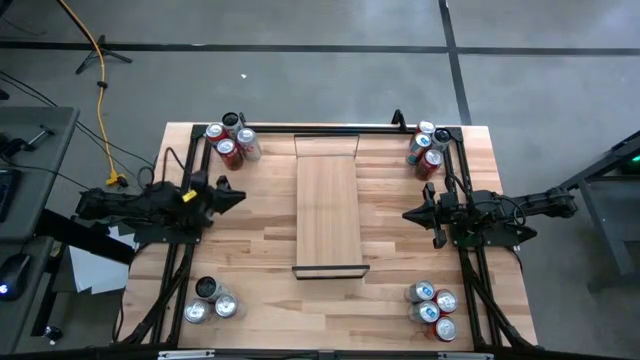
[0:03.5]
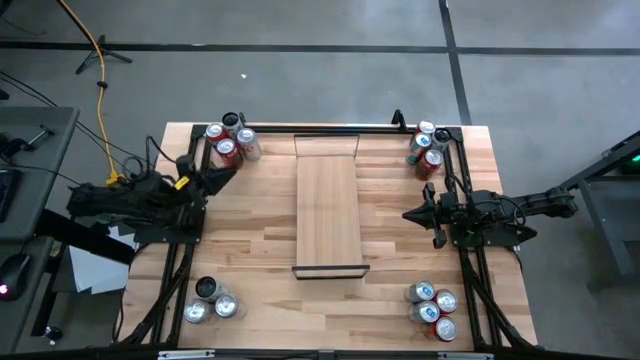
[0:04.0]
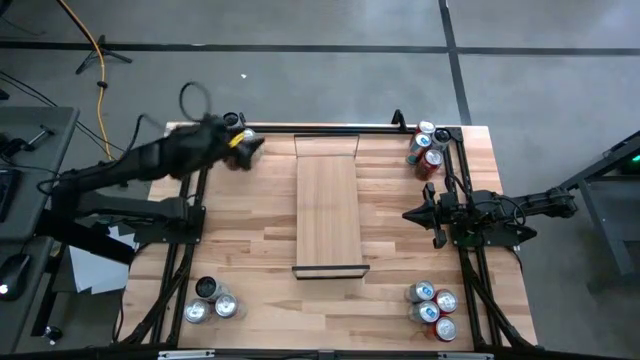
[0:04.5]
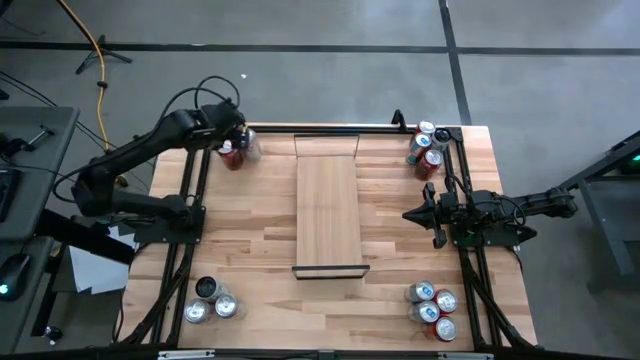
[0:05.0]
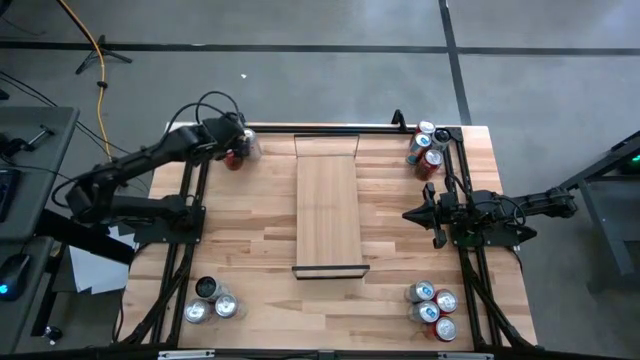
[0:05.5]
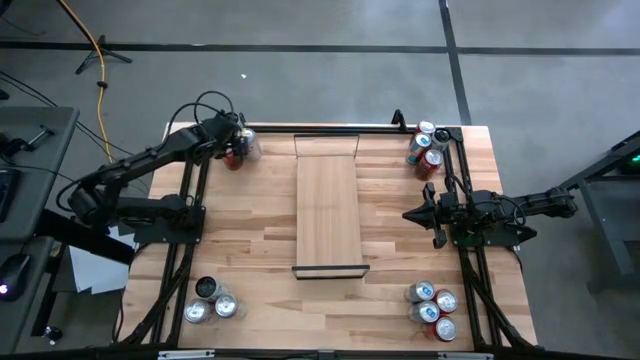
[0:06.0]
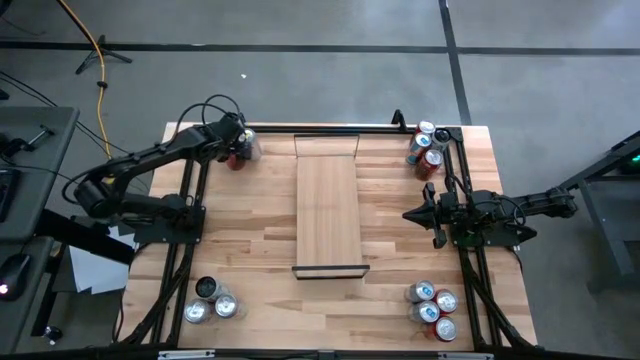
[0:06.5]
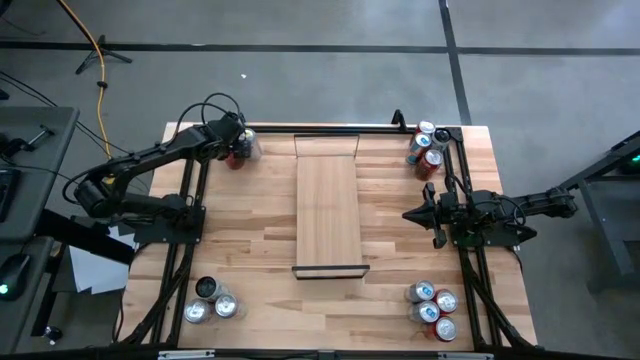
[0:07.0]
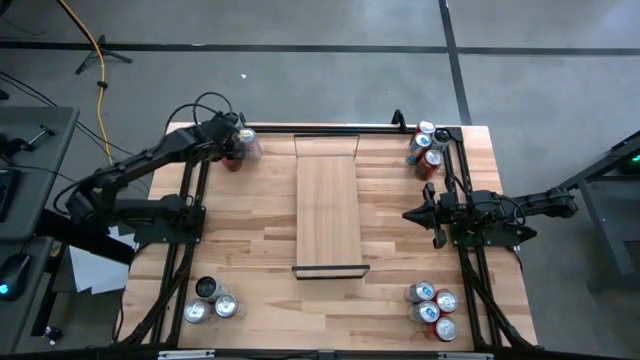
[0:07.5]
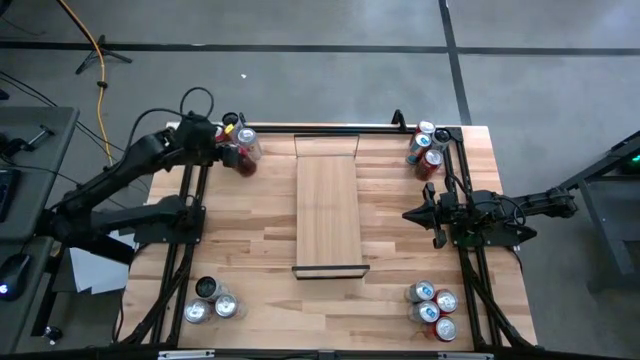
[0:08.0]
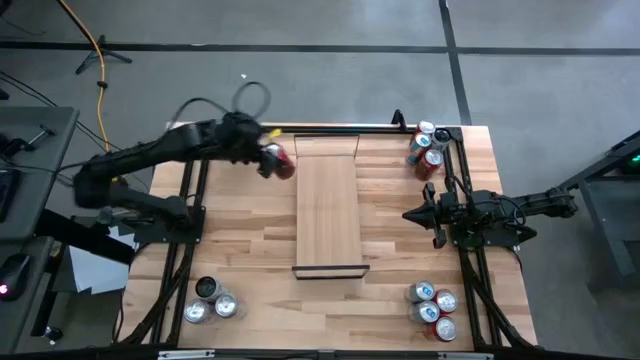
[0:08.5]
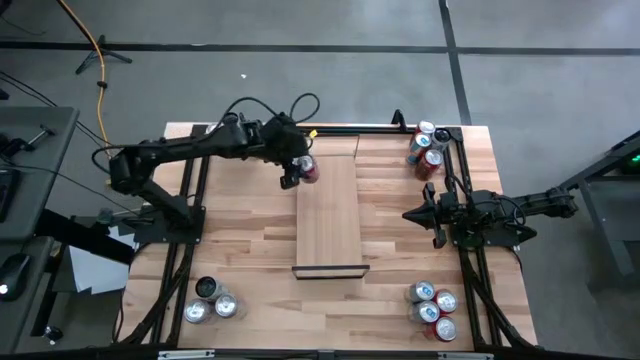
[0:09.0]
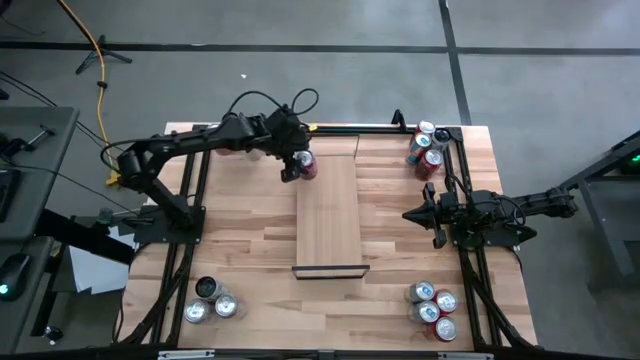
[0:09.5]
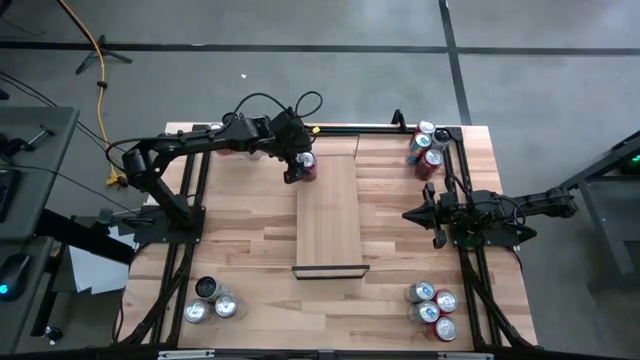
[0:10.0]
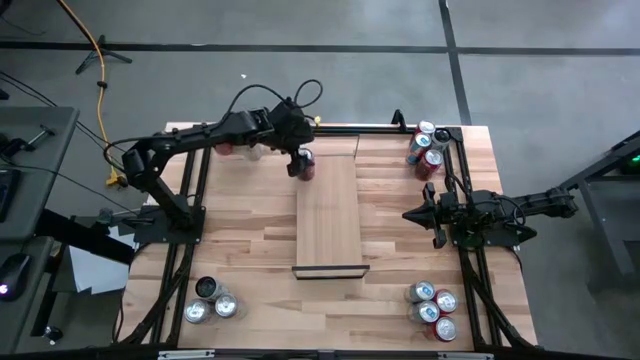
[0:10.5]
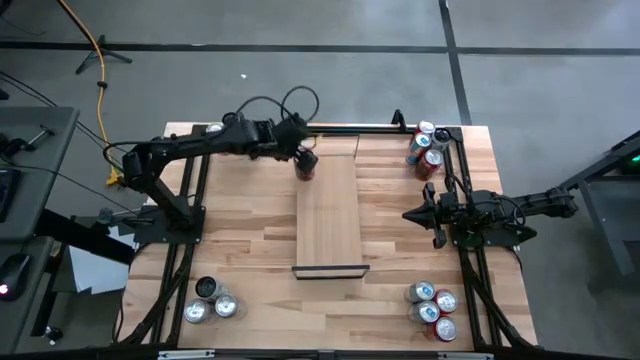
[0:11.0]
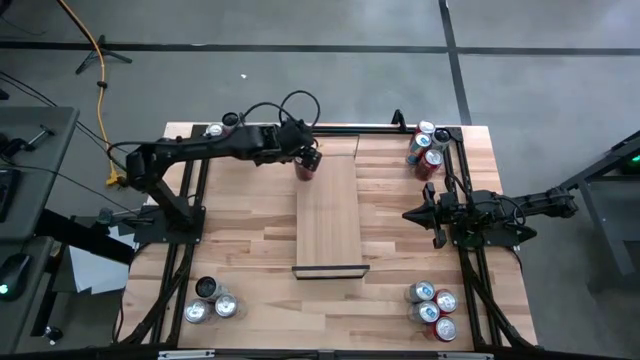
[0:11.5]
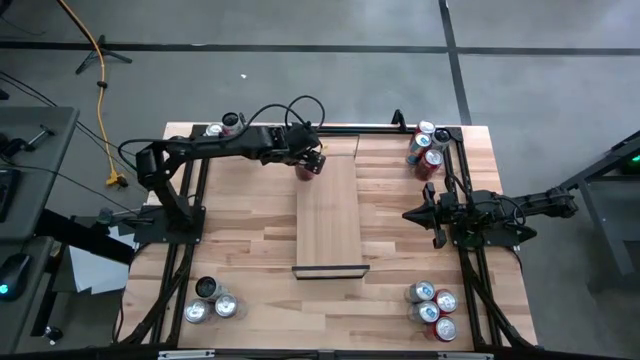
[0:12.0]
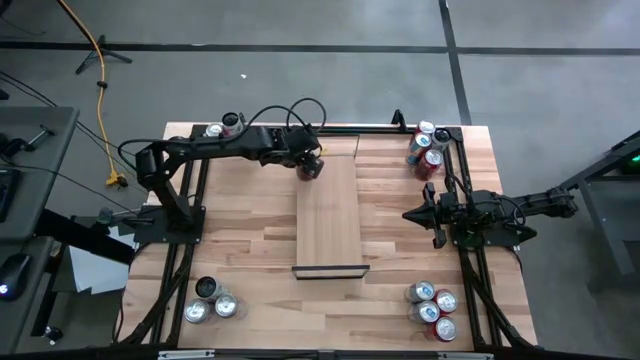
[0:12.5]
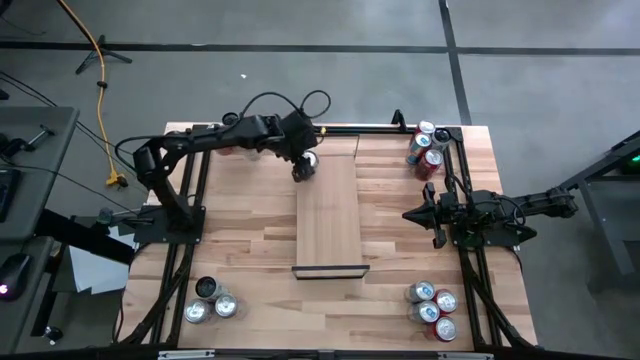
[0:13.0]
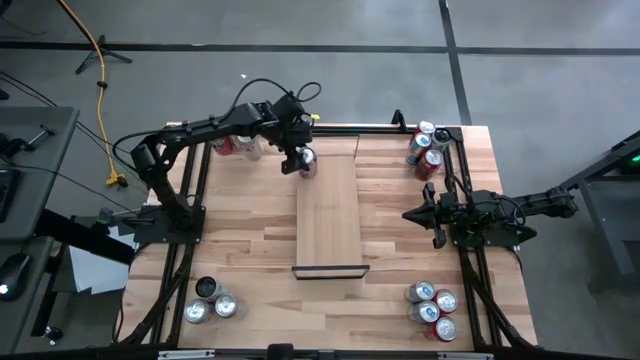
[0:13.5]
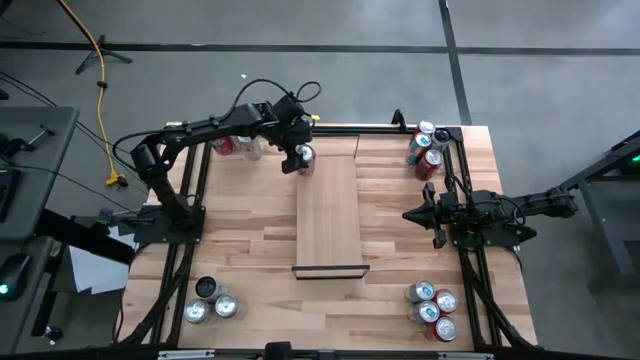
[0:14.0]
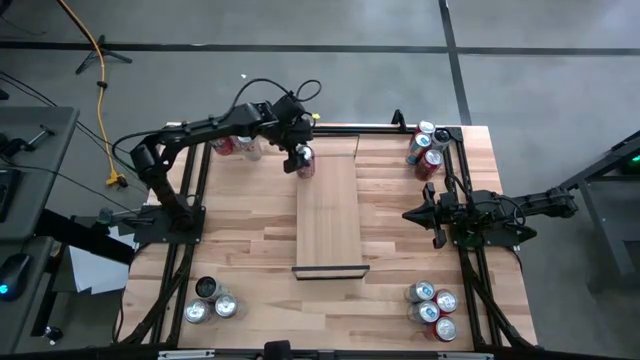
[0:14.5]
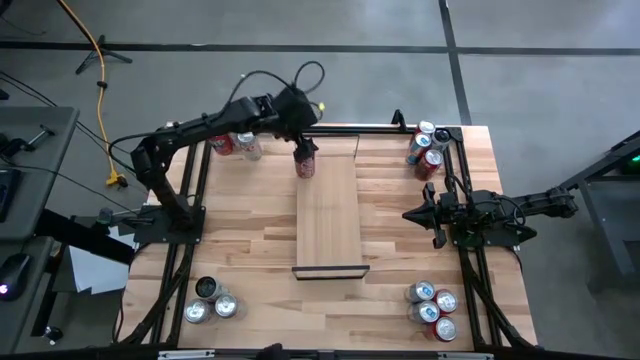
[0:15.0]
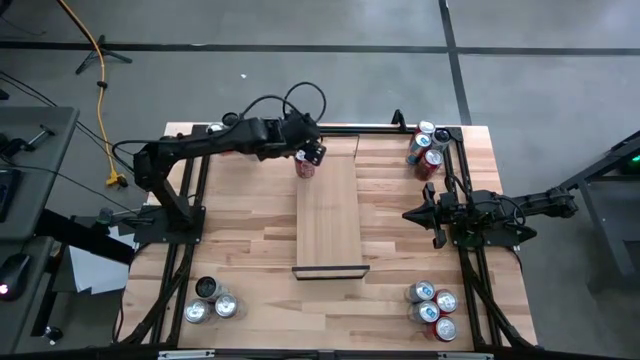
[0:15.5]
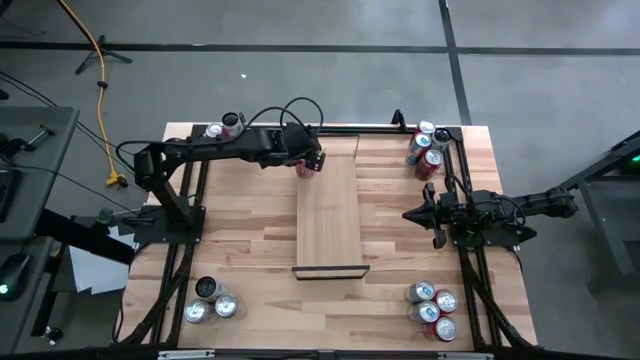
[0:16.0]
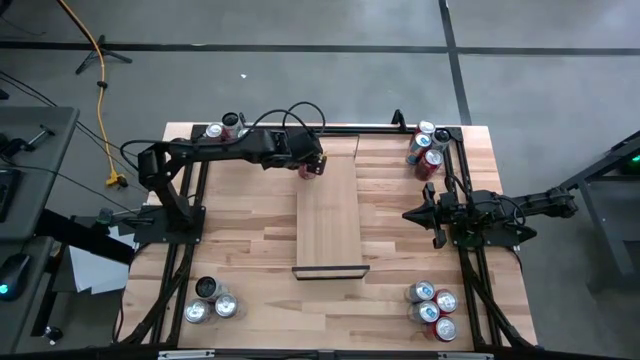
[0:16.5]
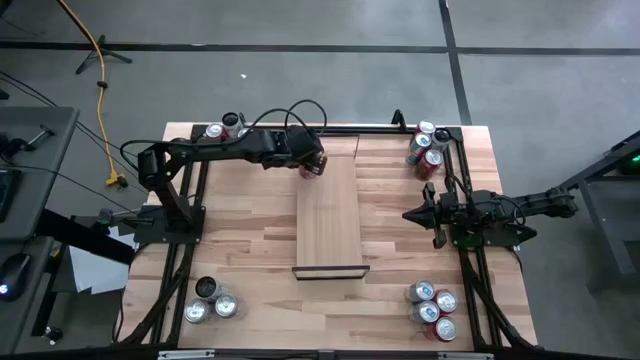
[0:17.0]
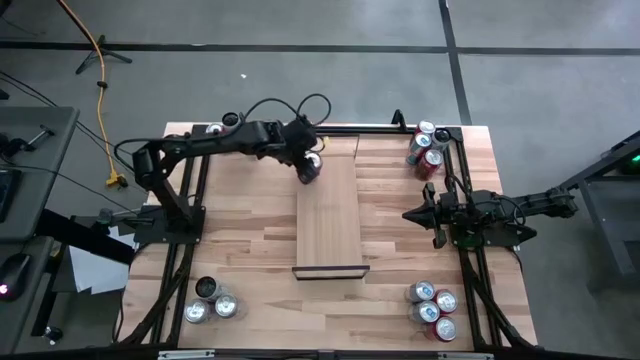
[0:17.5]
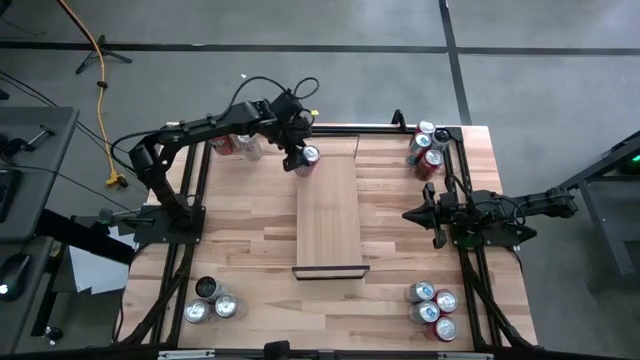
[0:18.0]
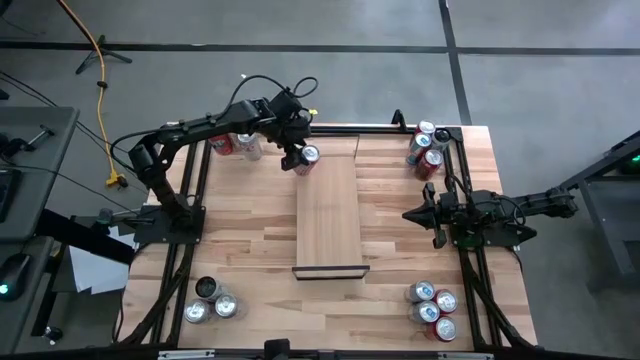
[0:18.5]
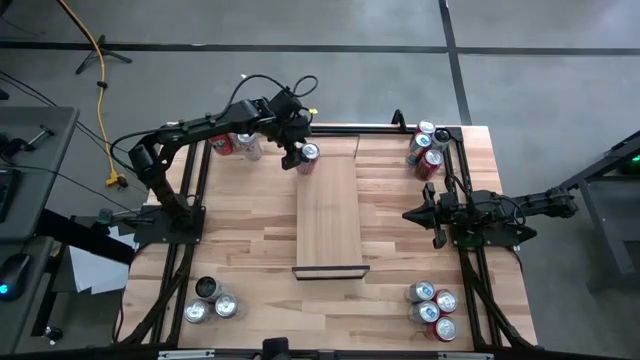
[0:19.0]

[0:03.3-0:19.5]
Task: Place canned beverage on shelf
Put the red soda can on the shelf

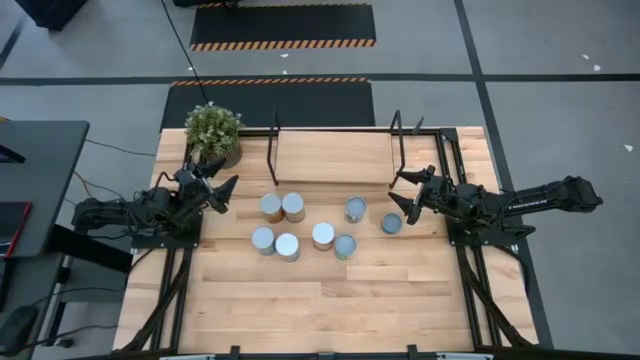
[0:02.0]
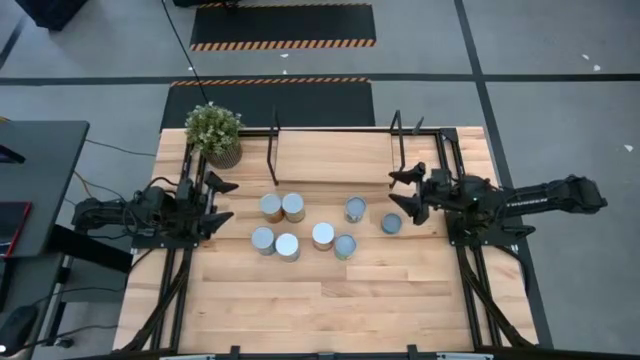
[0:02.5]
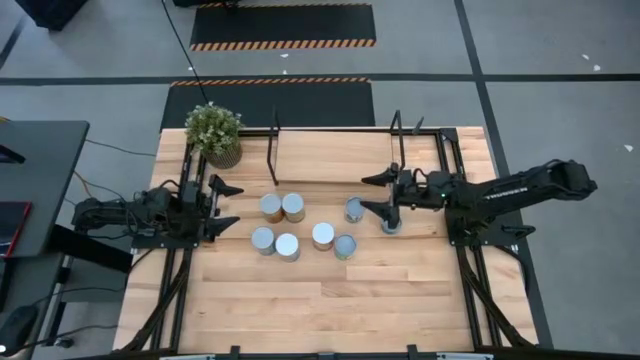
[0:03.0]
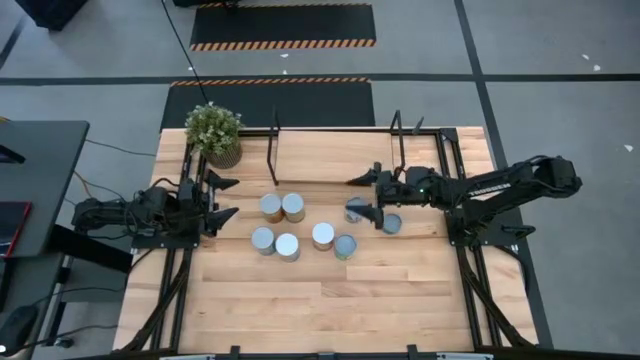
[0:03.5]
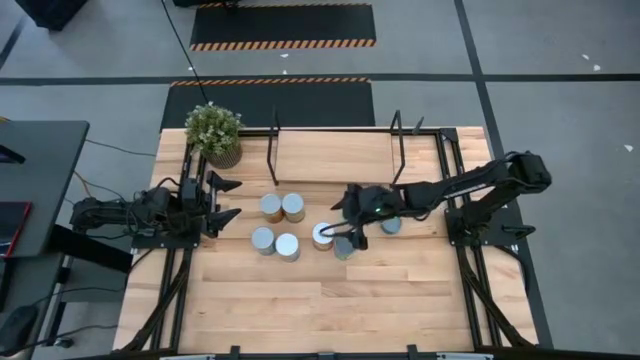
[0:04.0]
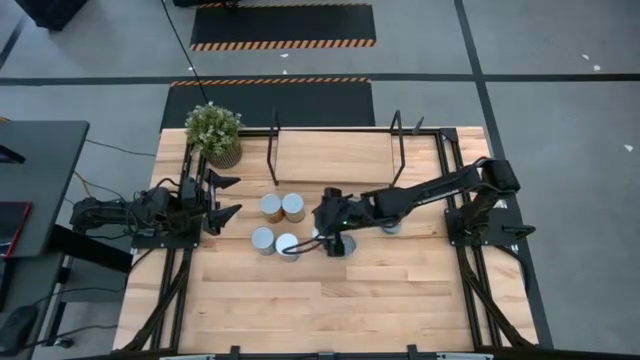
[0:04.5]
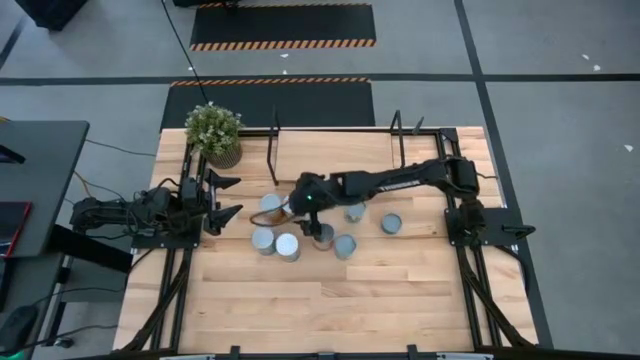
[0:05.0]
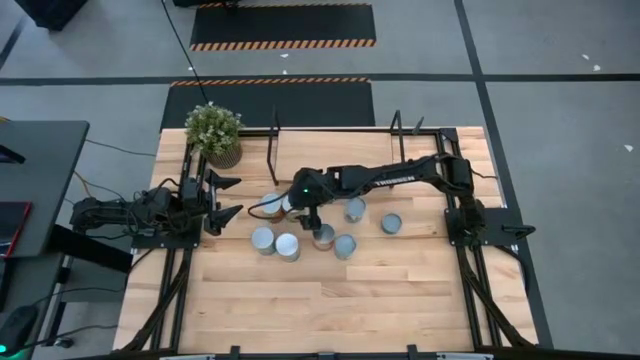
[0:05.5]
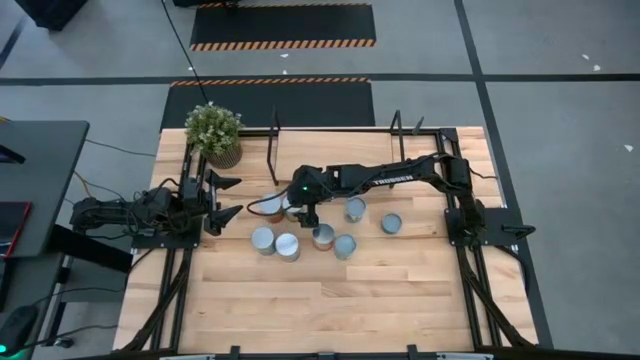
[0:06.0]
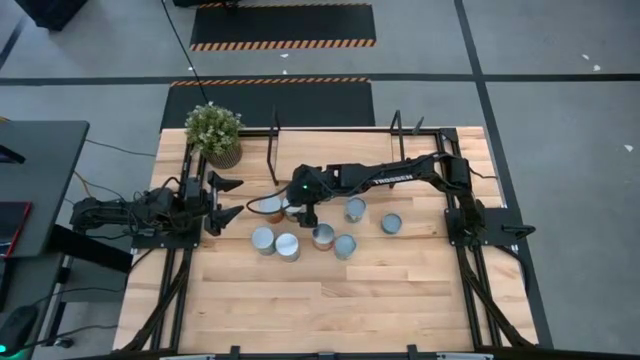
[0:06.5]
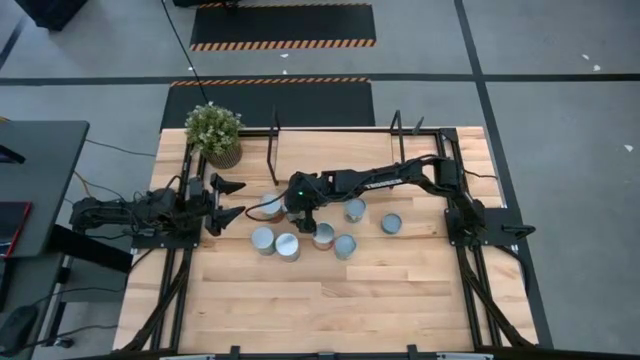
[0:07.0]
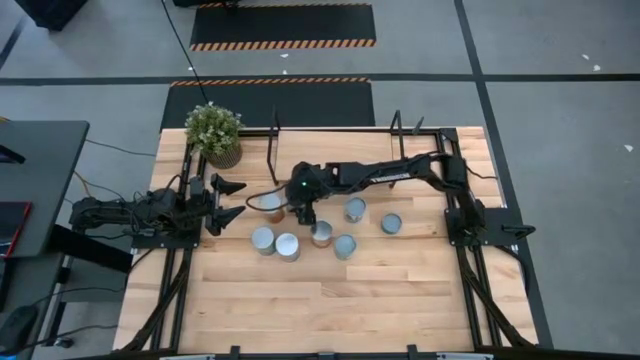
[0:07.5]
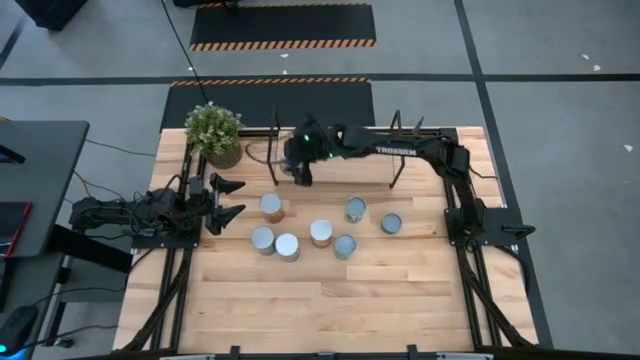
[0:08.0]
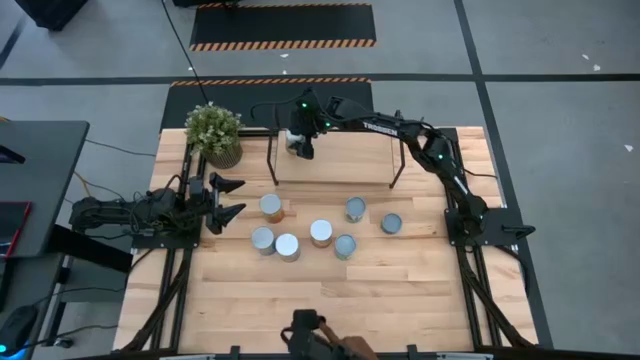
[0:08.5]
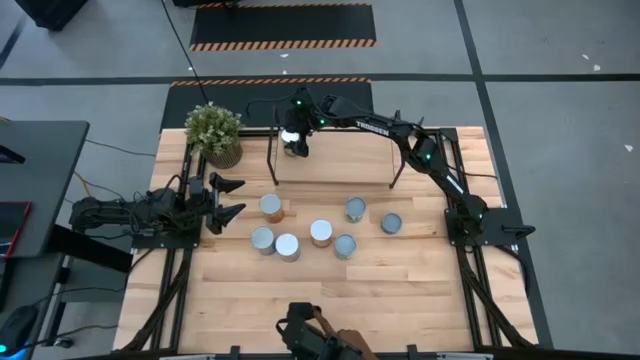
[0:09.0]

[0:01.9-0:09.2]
Task: Pick and place cans onto a shelf
Put the canned oranges on the shelf
